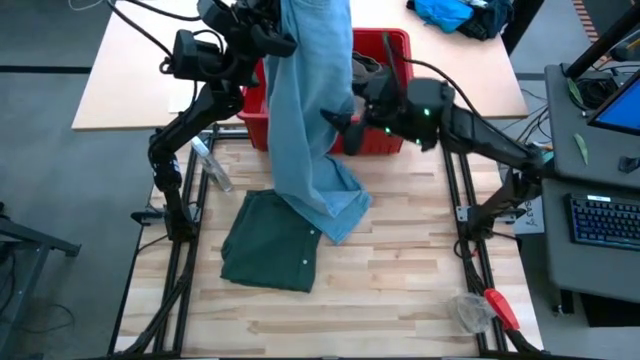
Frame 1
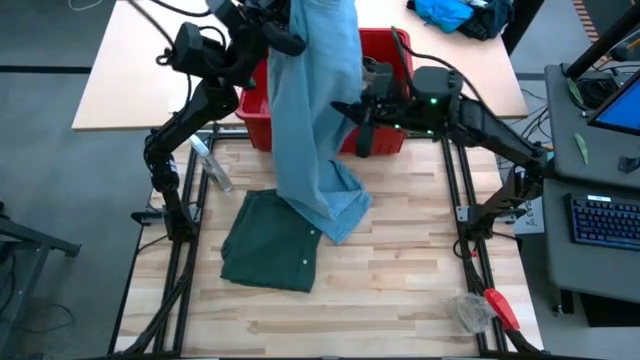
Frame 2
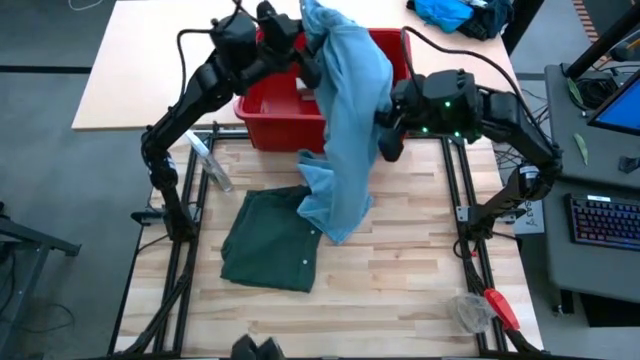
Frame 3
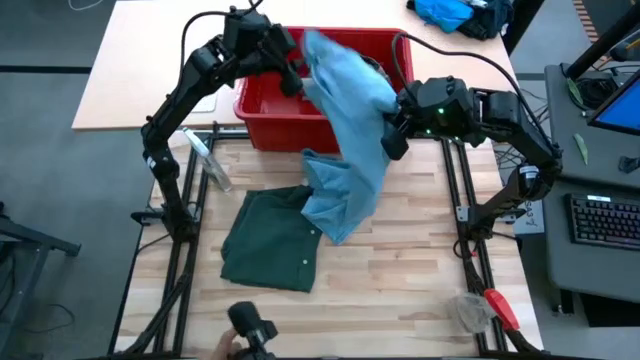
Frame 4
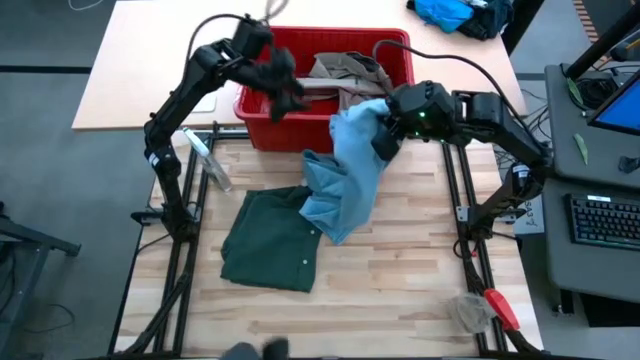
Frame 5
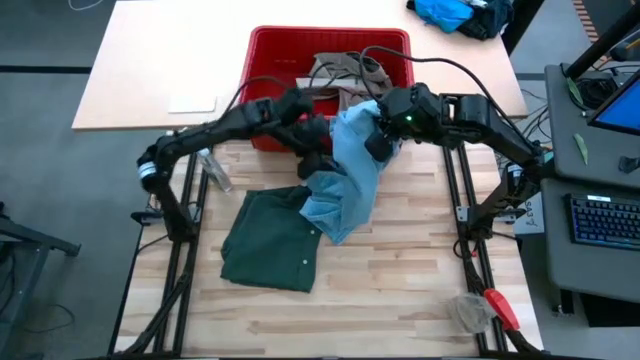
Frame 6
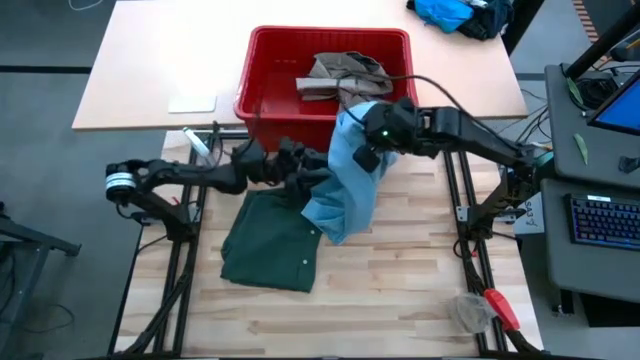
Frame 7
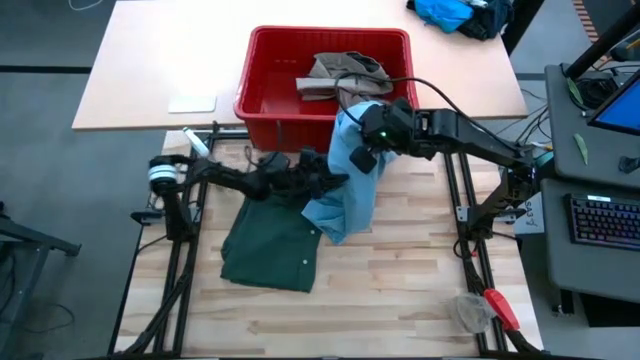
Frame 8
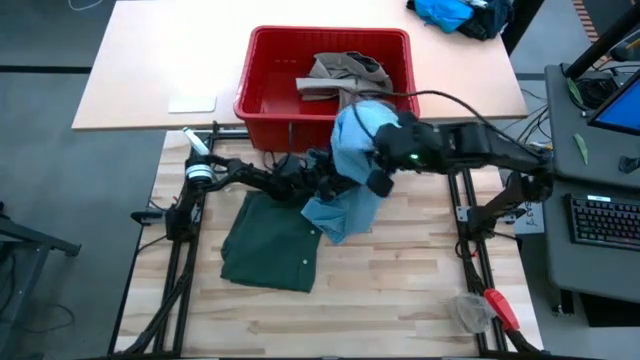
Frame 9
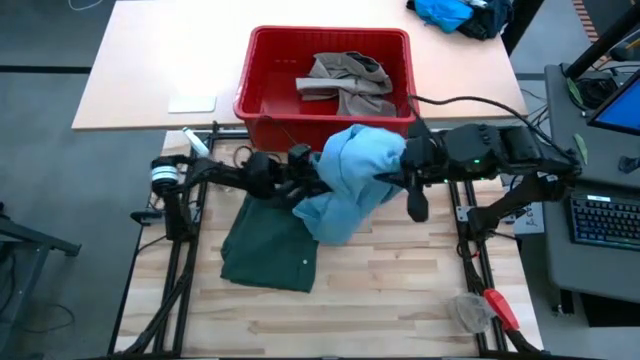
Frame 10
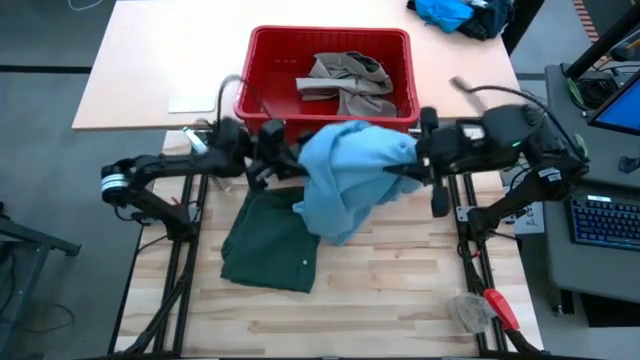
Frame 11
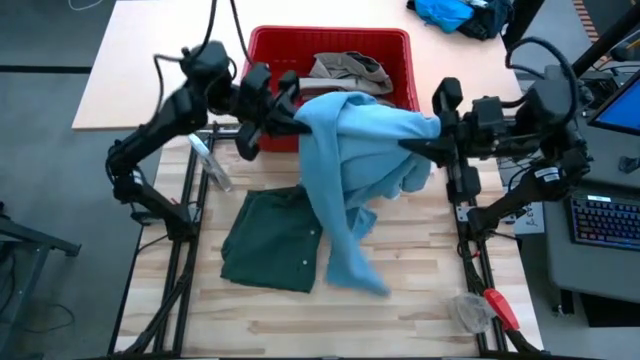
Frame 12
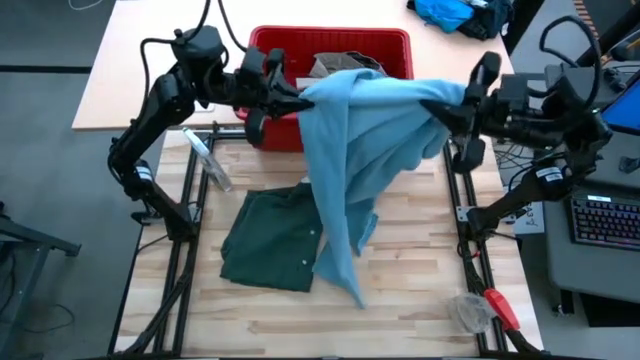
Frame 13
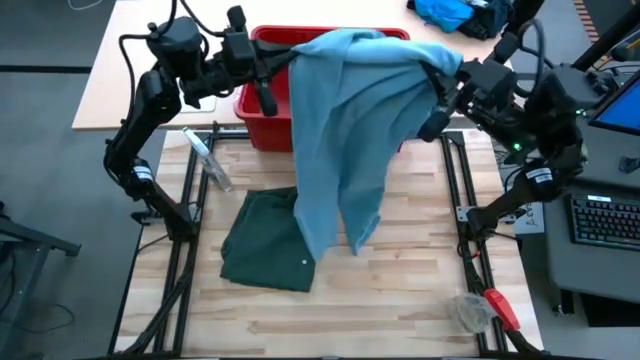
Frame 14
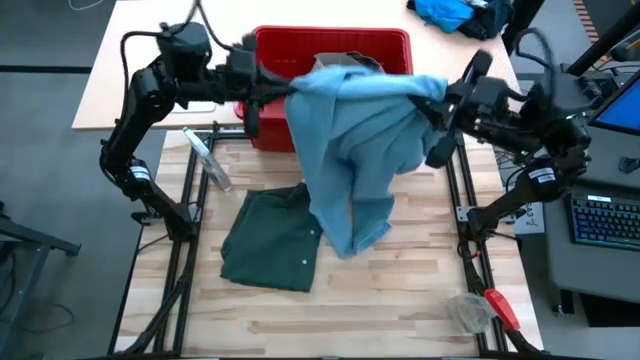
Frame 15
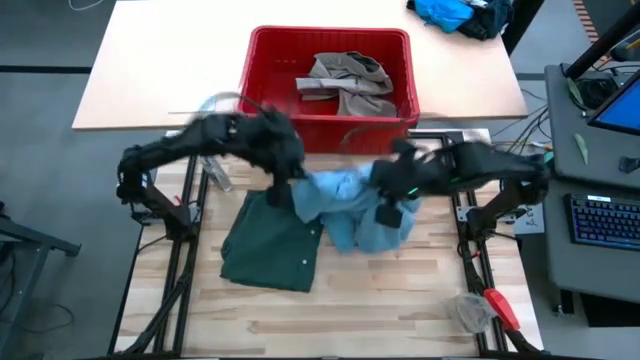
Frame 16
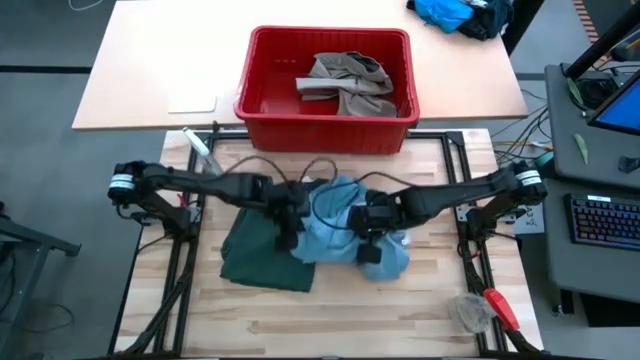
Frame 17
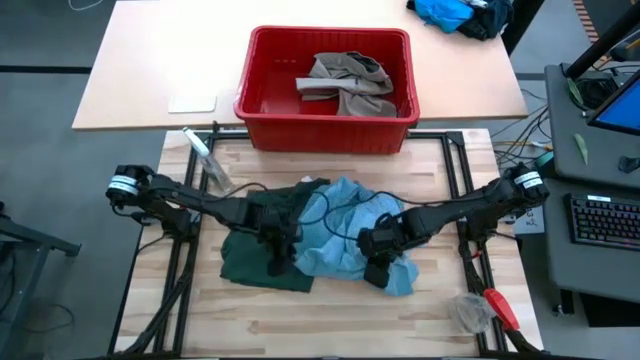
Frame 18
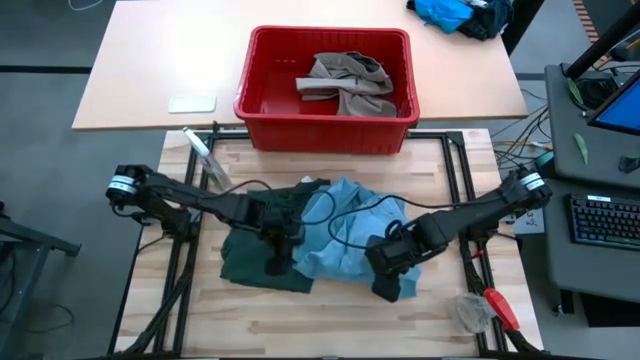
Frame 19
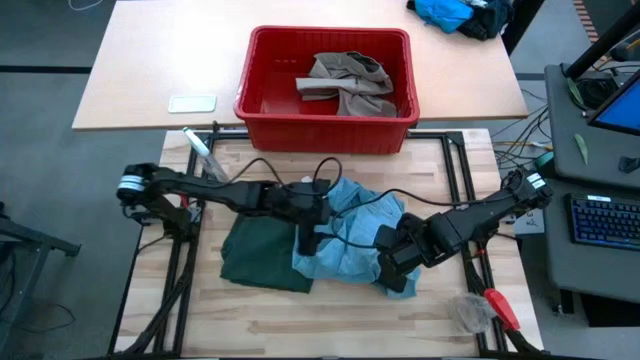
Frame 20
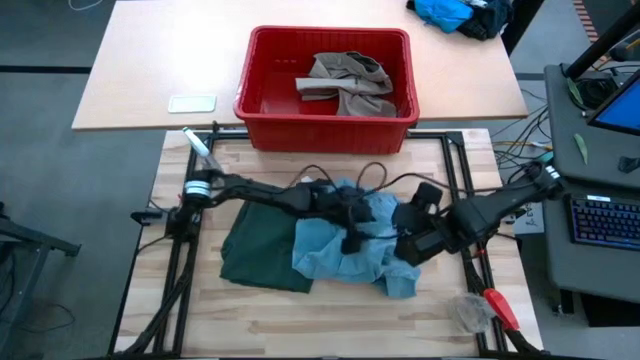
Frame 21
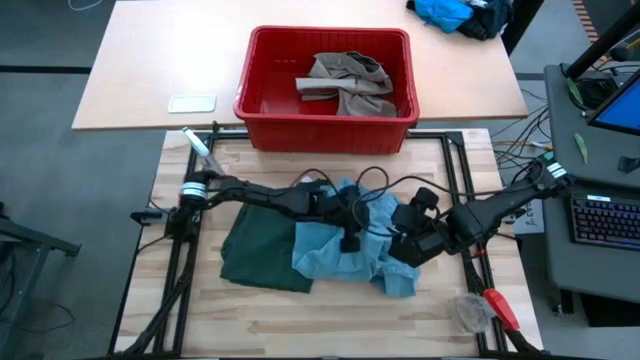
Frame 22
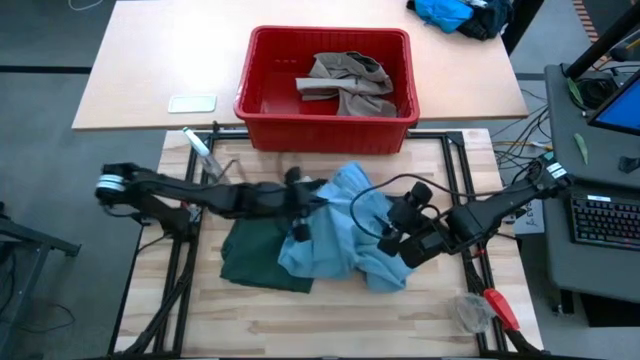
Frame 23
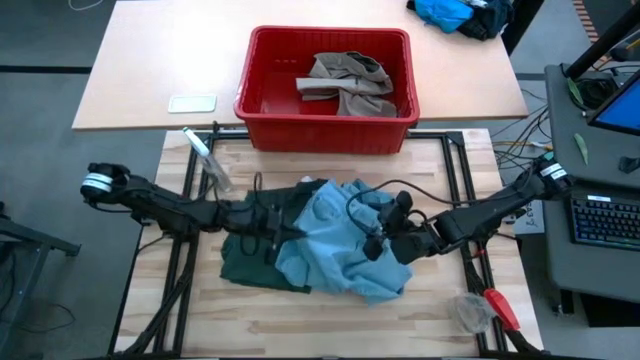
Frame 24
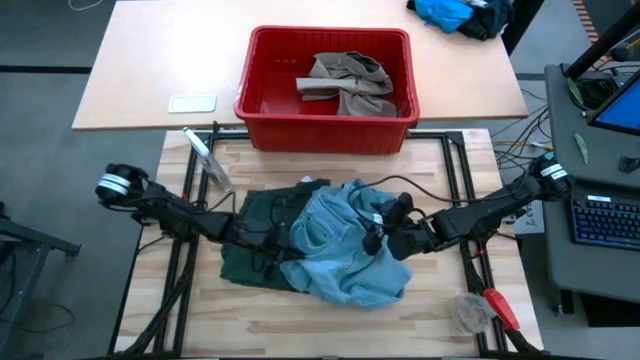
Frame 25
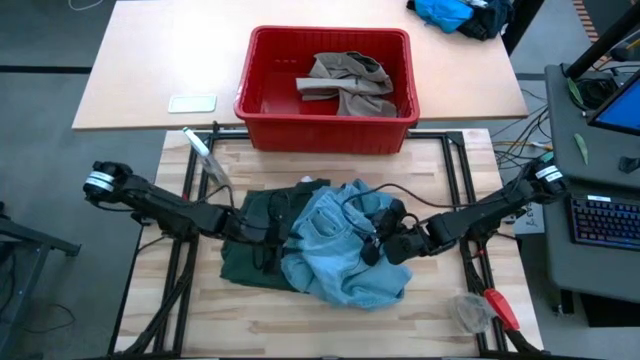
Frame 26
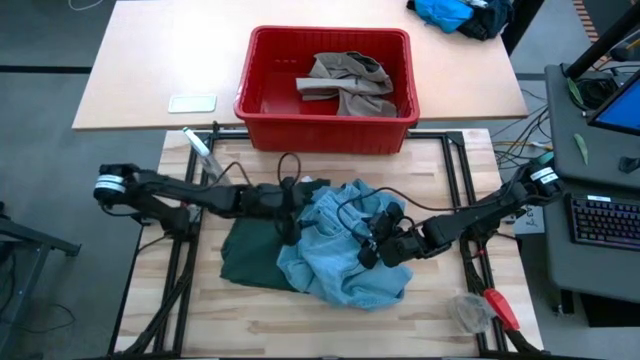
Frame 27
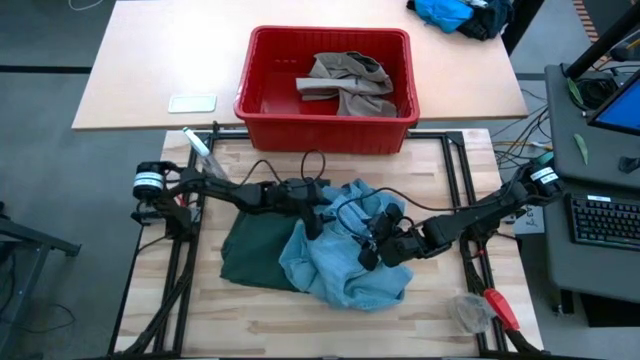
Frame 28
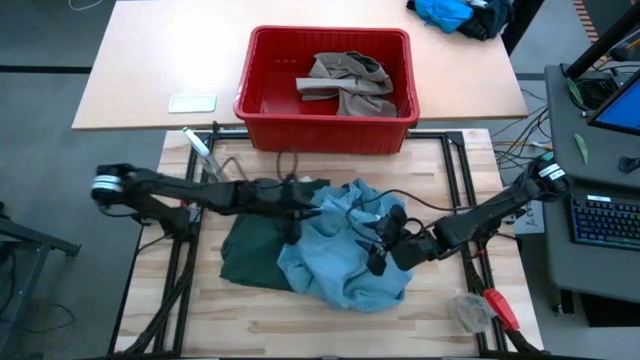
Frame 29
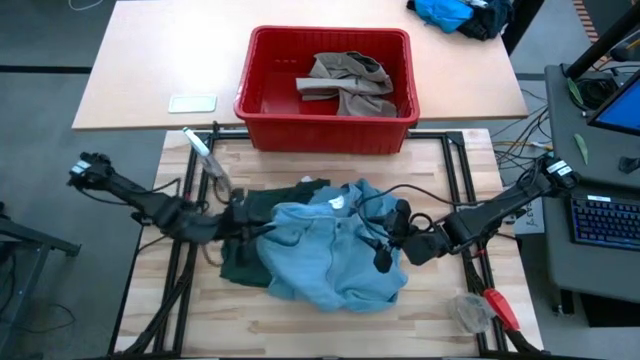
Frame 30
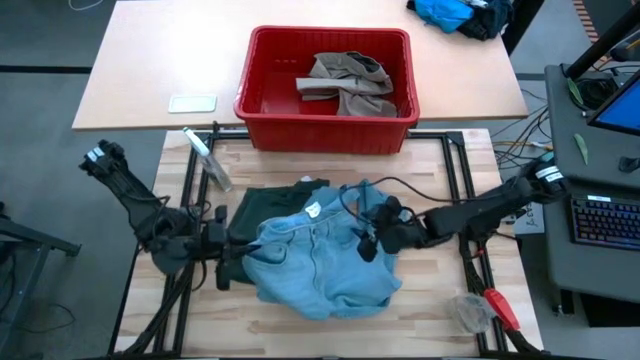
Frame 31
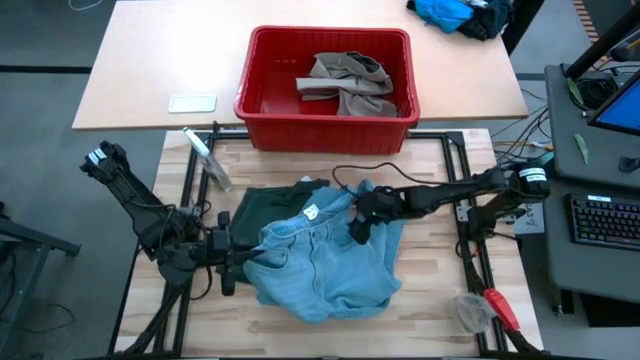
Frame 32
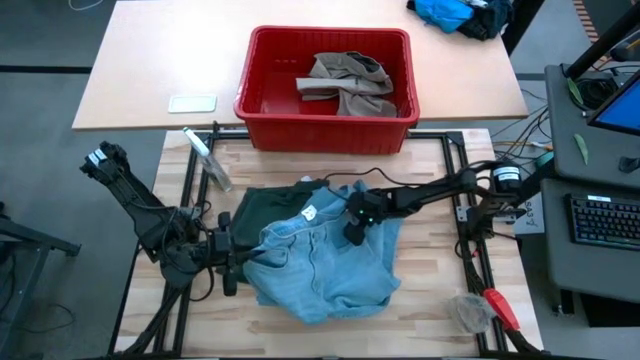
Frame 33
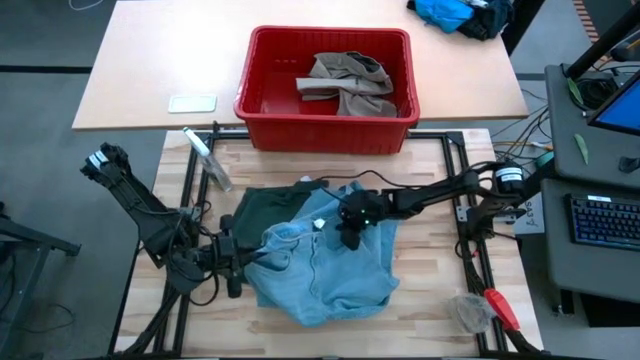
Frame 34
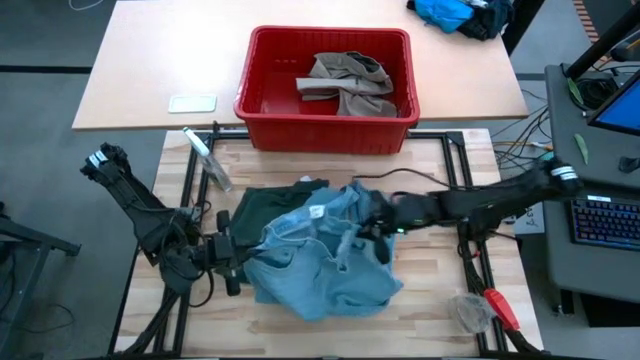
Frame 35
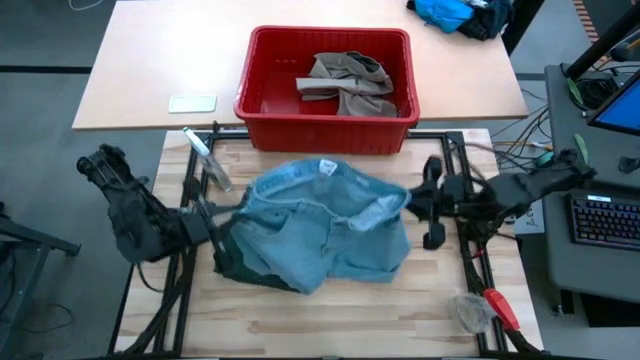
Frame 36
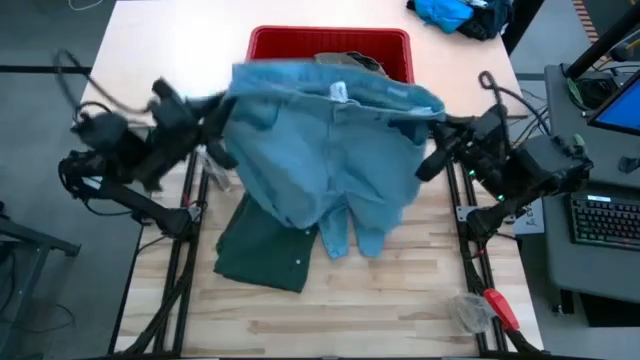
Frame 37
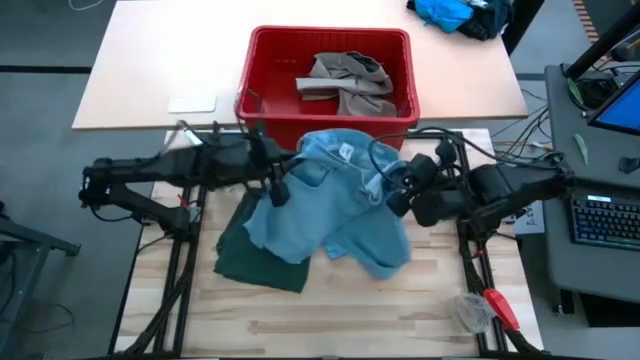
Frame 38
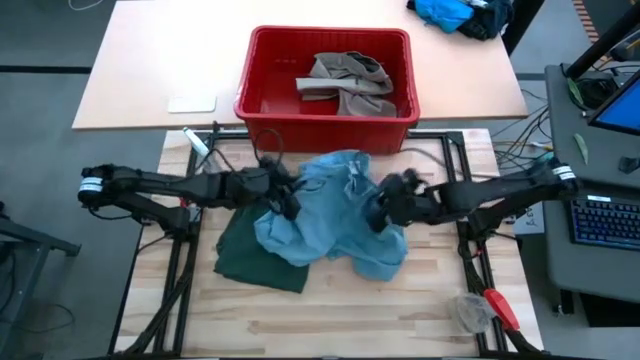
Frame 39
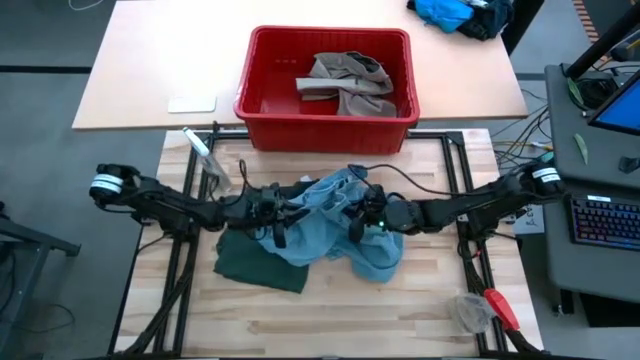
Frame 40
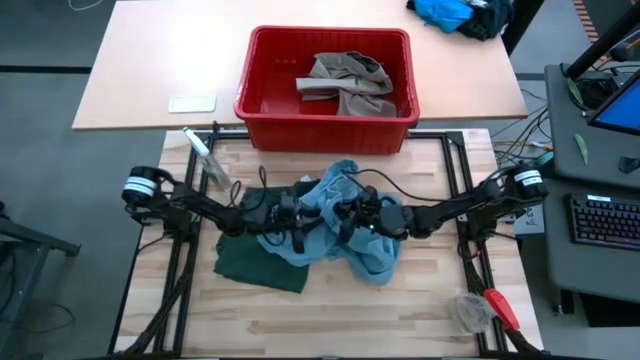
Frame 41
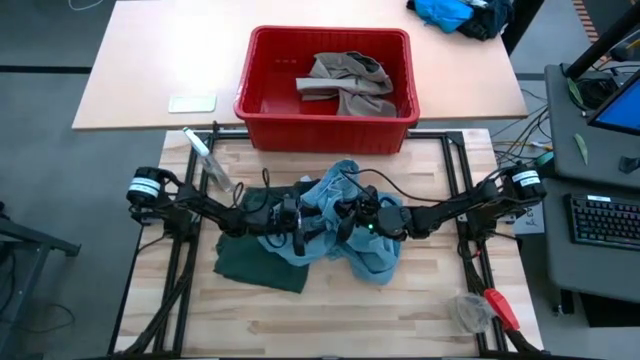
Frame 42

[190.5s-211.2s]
Task: Fold Laundry from Bin
Fold the blue jeans
